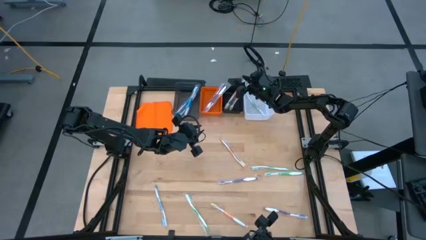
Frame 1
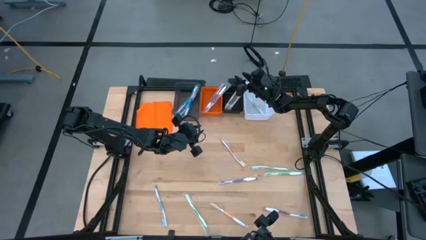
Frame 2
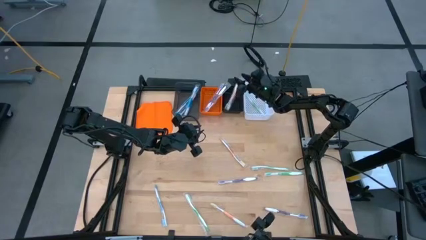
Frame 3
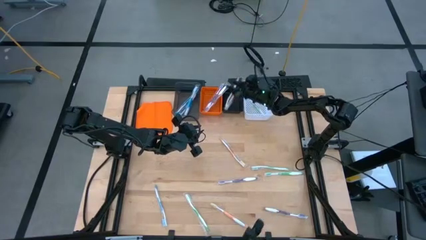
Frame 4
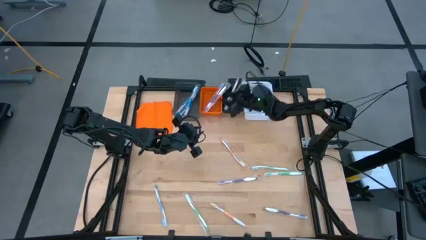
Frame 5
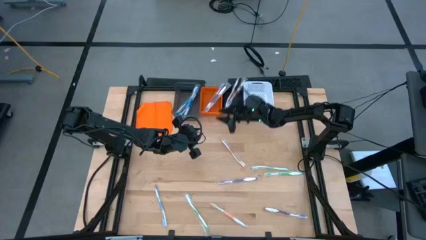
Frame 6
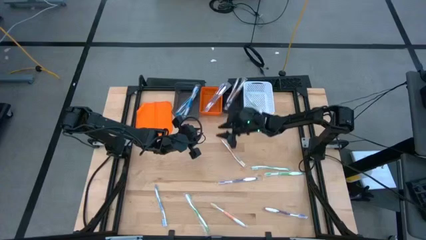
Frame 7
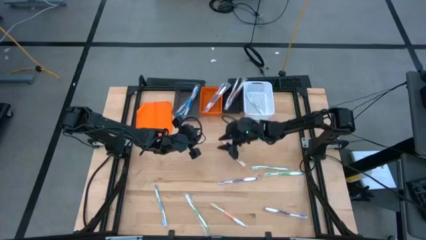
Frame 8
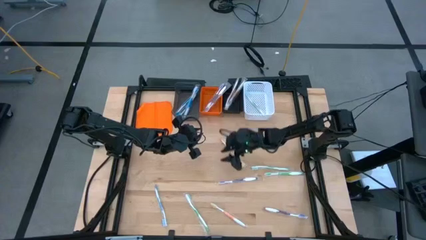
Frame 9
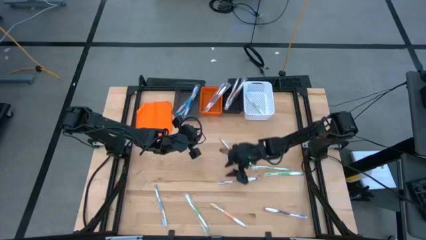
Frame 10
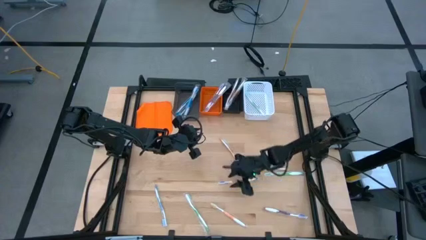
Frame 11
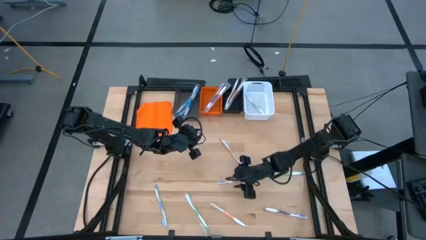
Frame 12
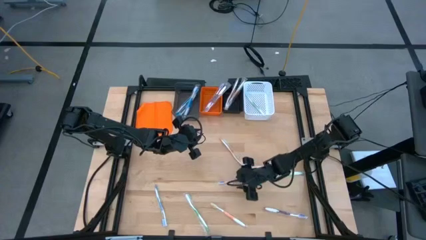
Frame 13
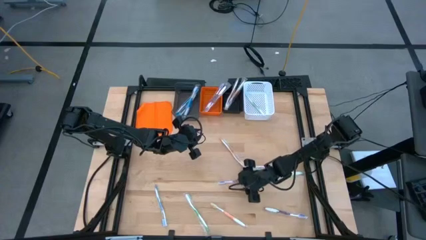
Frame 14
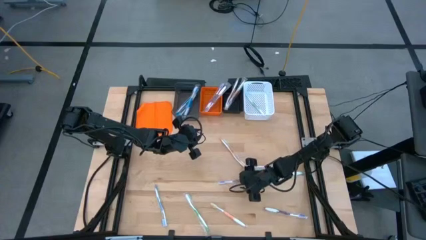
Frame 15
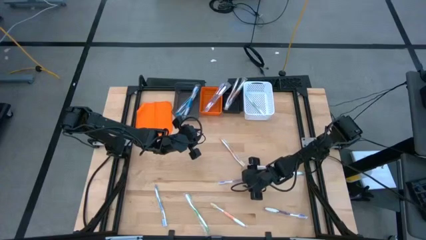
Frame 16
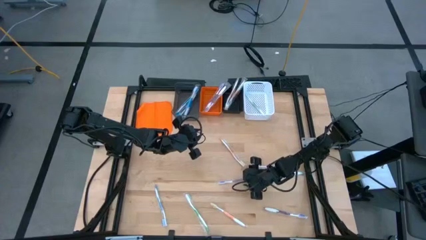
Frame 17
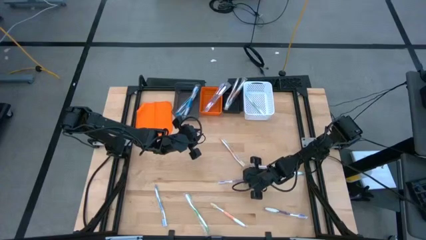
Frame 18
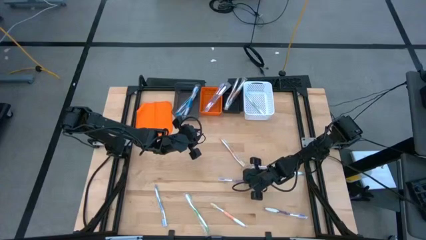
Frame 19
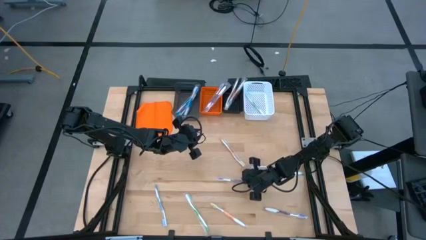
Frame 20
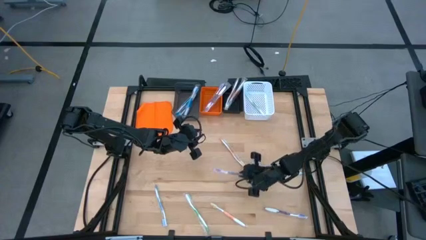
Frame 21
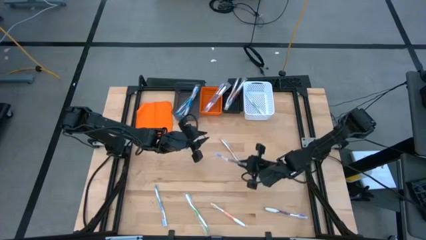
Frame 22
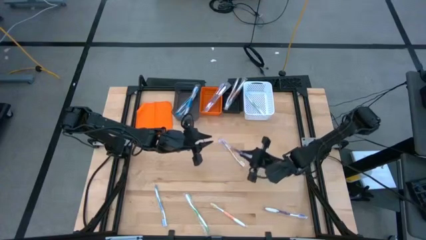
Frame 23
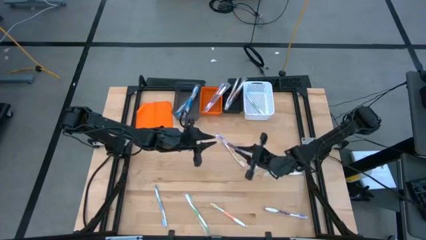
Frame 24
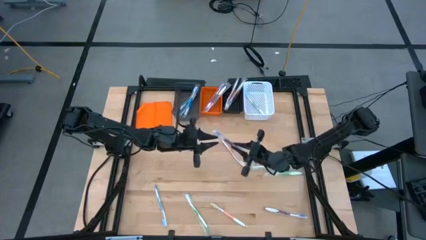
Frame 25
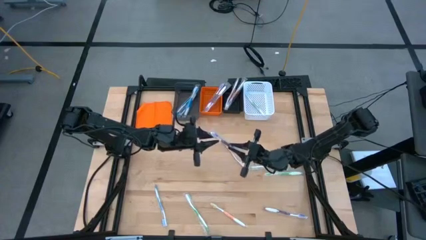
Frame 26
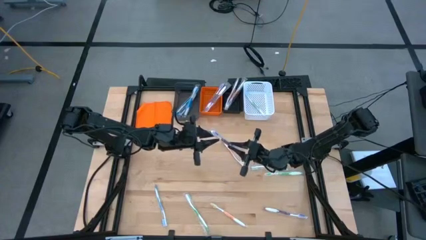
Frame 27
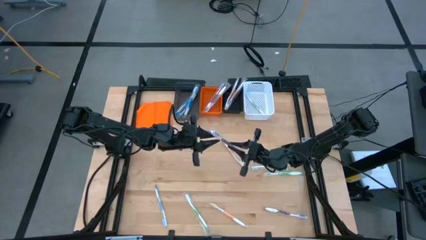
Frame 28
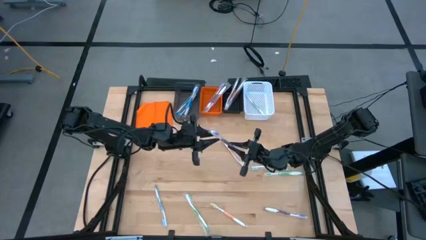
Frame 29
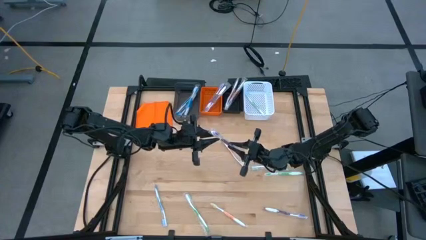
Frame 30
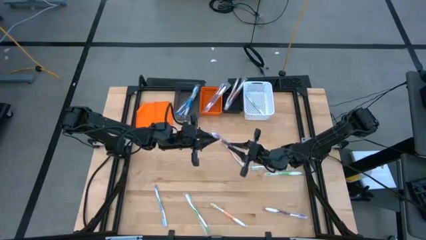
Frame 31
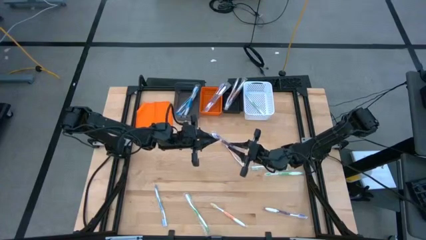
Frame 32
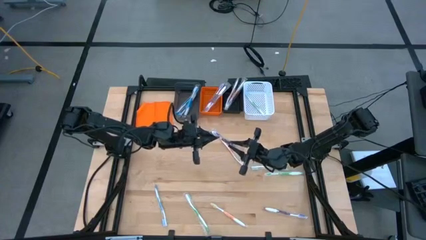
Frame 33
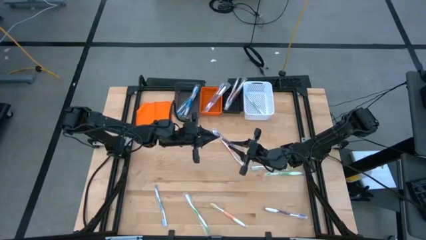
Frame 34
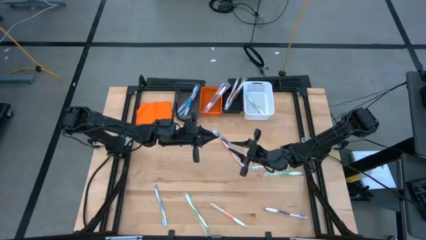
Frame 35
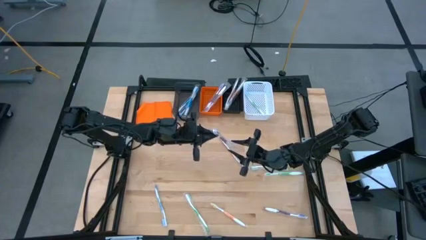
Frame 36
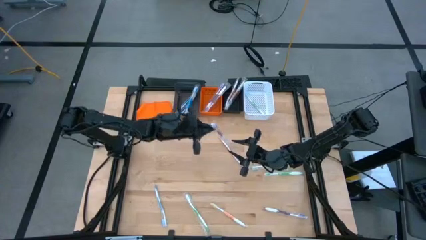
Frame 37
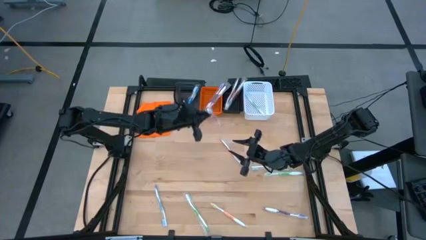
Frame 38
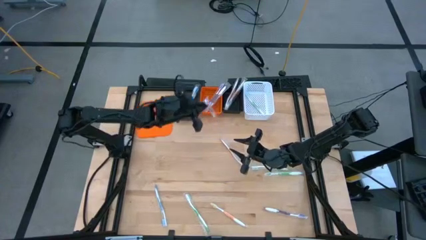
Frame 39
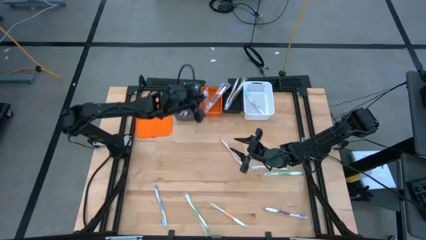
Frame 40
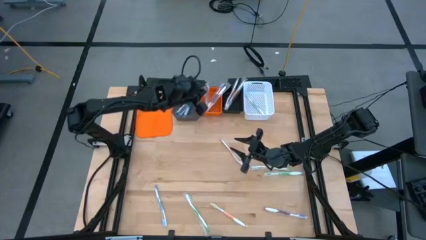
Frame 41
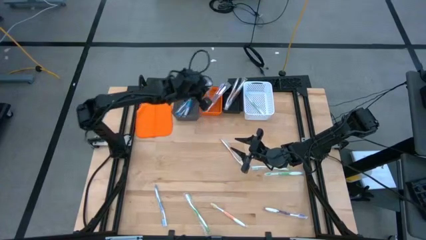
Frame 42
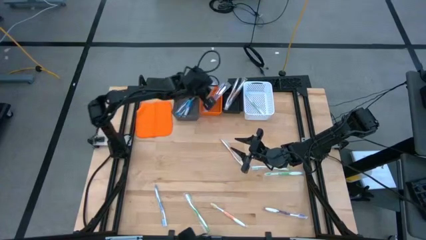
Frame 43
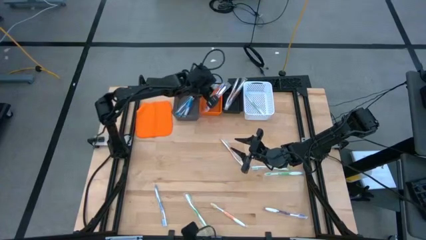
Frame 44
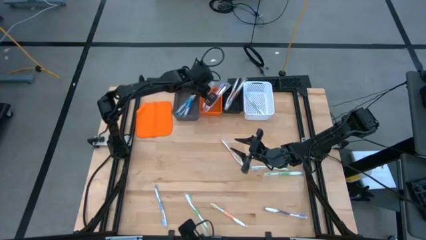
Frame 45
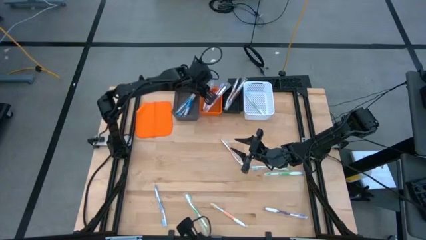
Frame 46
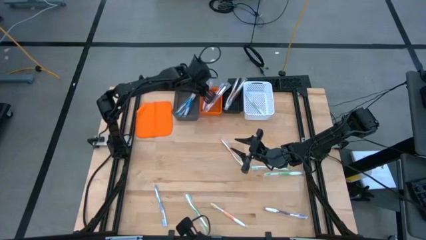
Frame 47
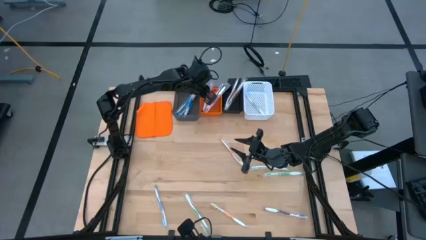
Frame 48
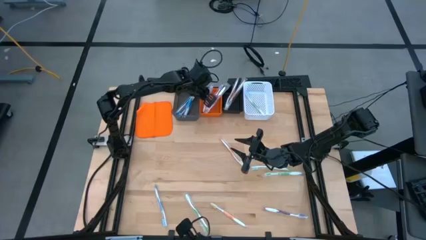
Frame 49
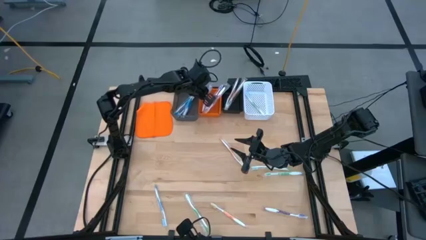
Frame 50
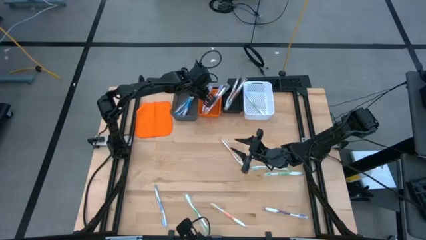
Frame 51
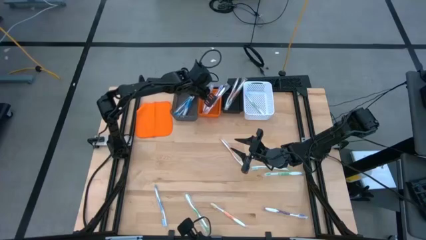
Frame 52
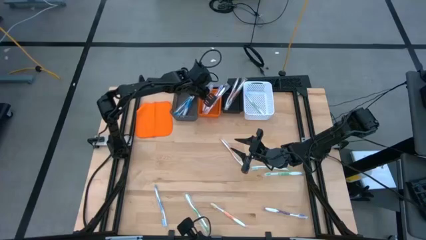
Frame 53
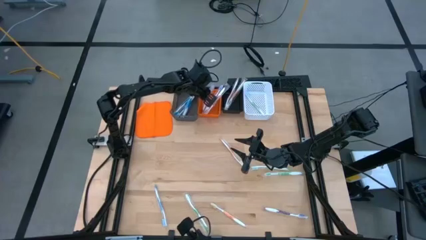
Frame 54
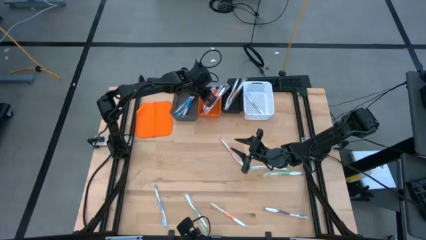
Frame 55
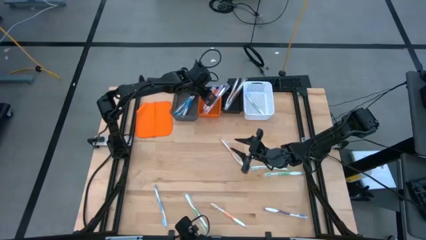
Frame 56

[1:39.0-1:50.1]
Task: Pick & Place Toothbrushes
Put the violet toothbrush into the orange bin

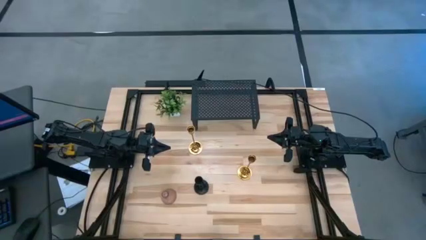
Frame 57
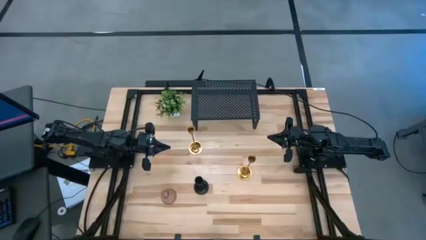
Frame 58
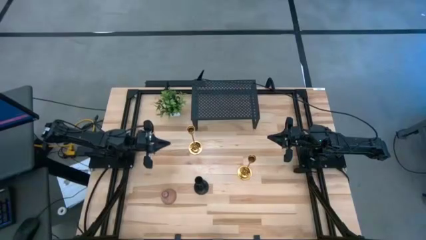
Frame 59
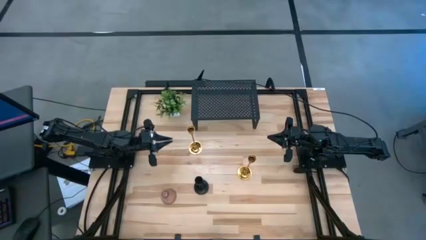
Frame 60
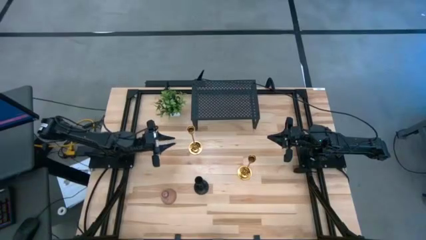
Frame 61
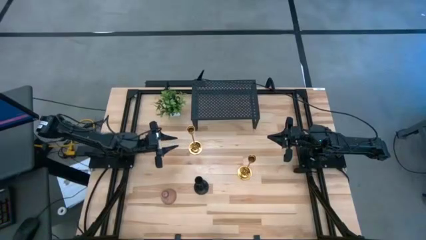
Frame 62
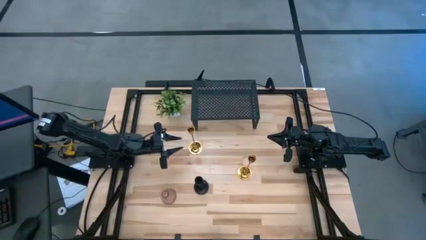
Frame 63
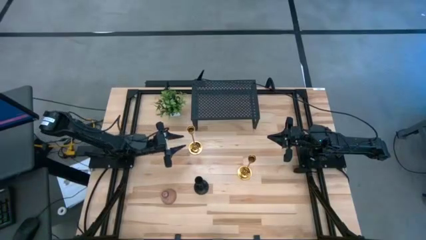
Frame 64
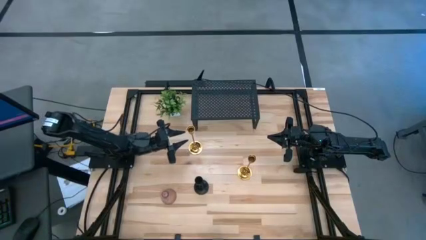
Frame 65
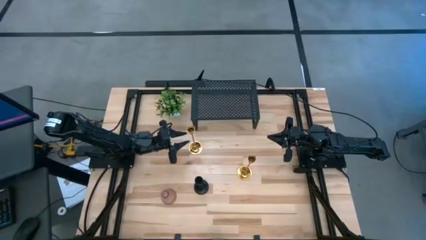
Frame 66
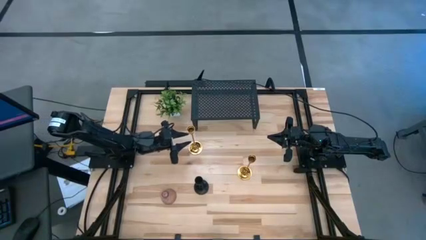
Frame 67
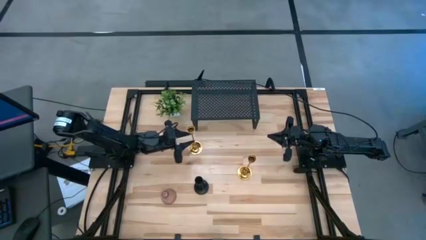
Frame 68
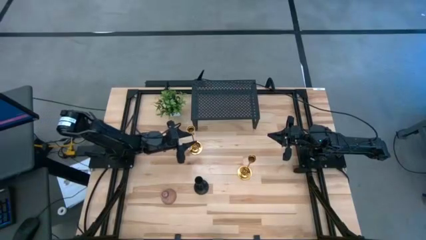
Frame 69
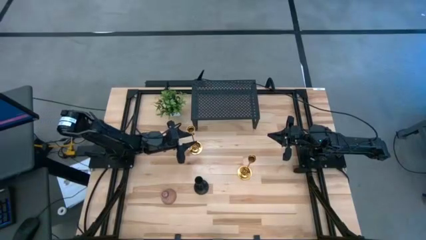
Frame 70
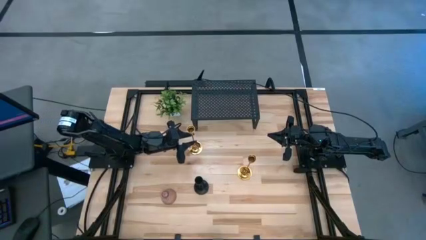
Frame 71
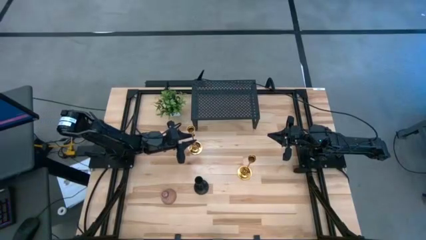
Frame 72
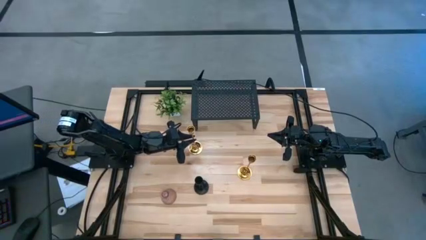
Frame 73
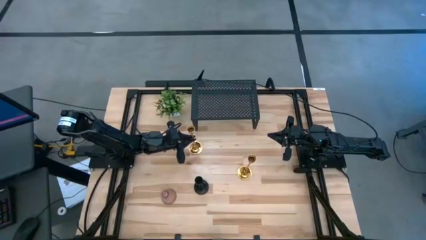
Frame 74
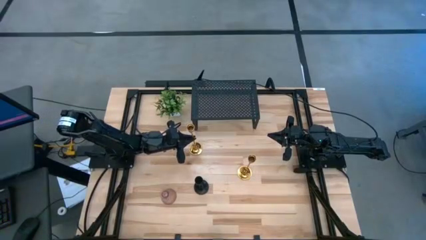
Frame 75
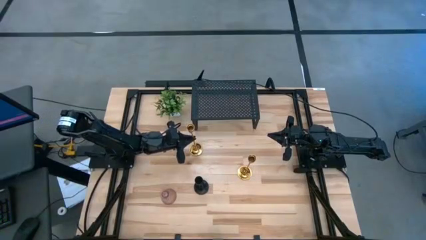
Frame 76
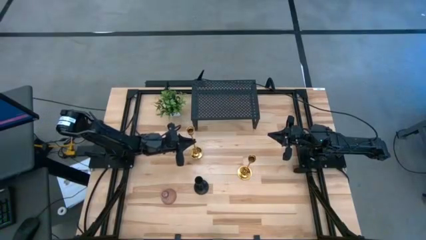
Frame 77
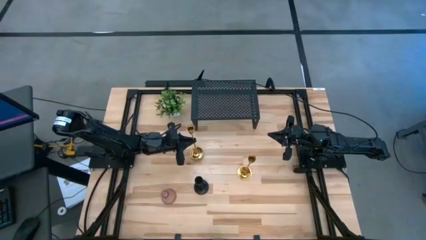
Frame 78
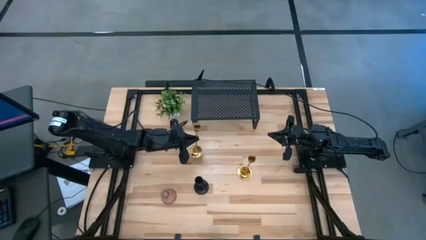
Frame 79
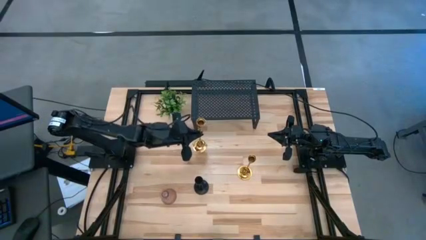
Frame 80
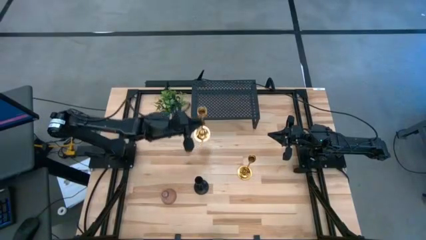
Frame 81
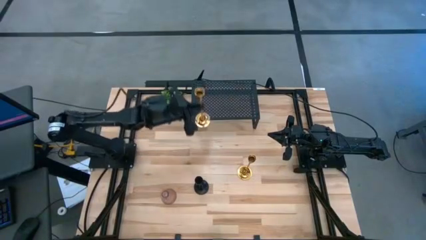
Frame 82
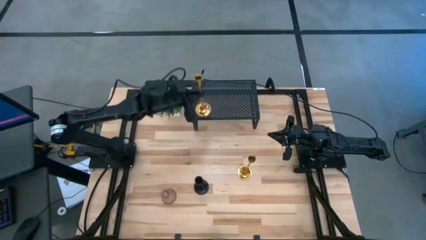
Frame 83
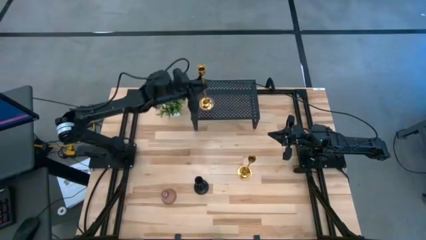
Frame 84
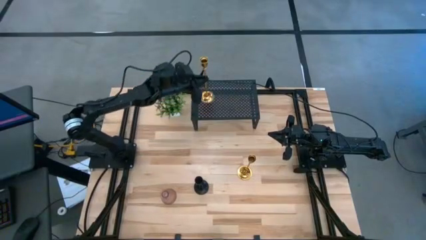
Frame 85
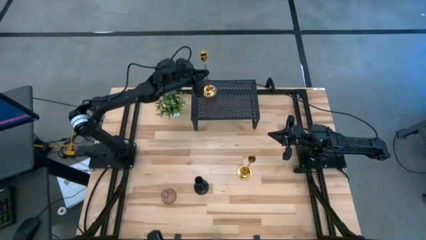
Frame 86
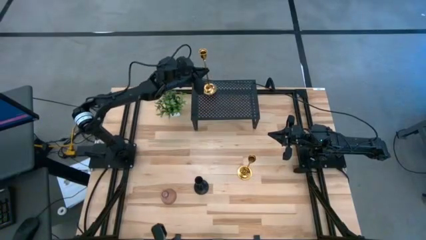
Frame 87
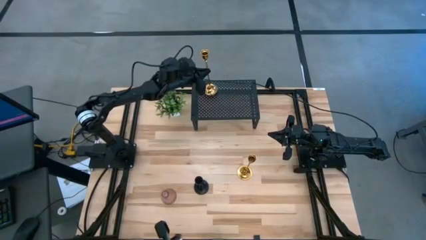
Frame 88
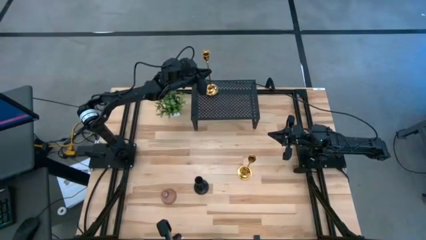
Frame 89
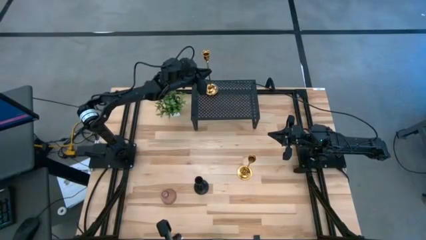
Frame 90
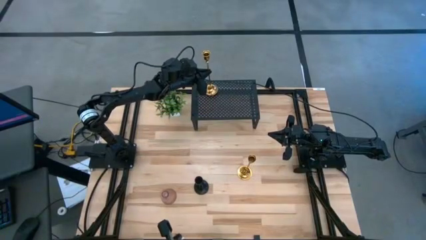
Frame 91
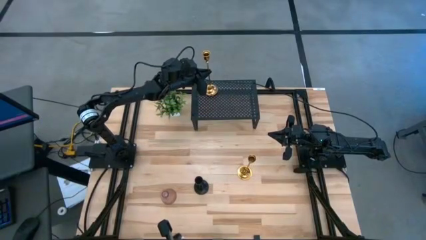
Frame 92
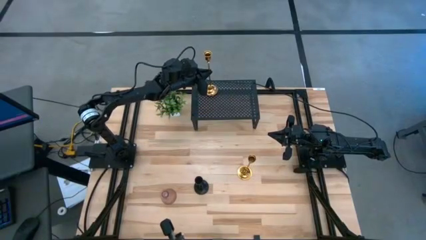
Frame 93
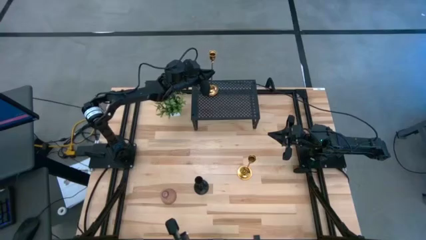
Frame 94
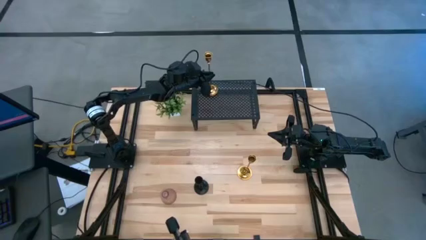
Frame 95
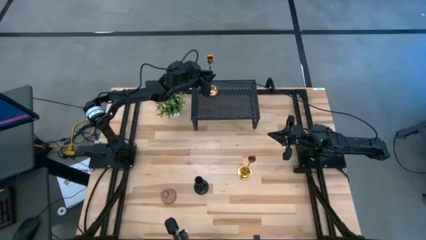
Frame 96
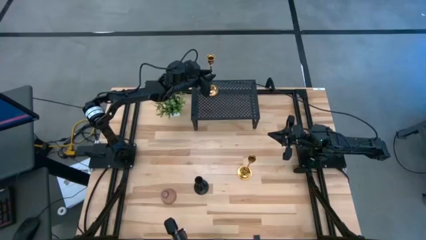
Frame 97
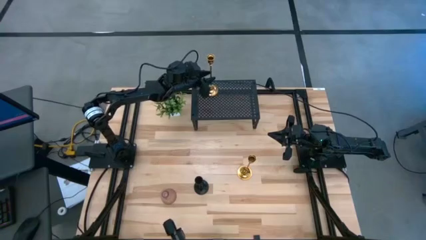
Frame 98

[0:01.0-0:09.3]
Task: Pick & Place candle stick holders
Put the top golden candle holder on the shelf
